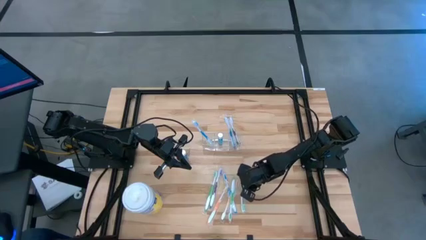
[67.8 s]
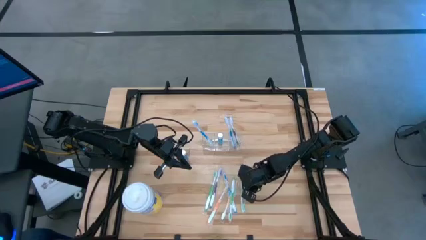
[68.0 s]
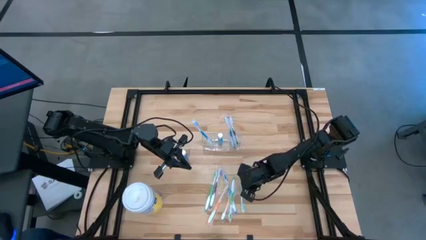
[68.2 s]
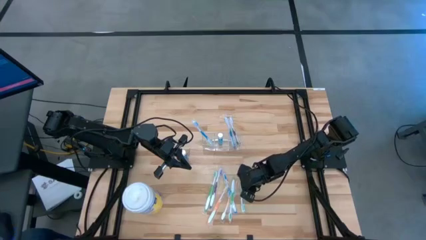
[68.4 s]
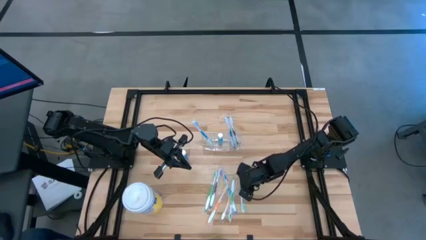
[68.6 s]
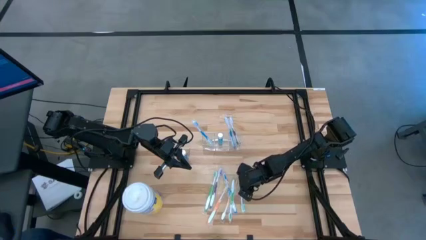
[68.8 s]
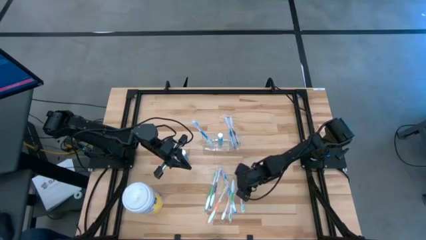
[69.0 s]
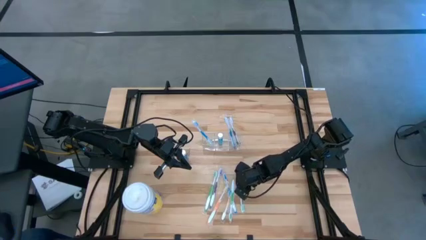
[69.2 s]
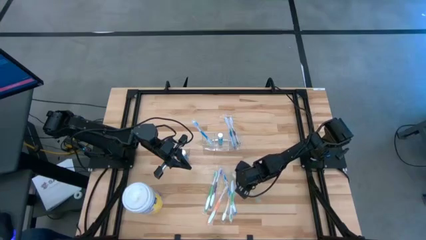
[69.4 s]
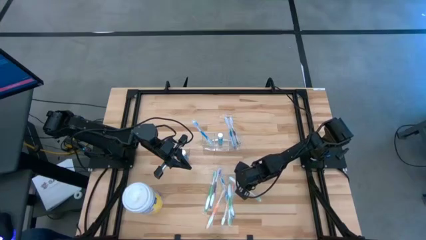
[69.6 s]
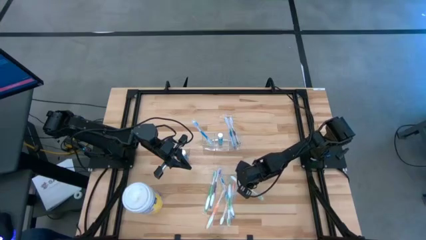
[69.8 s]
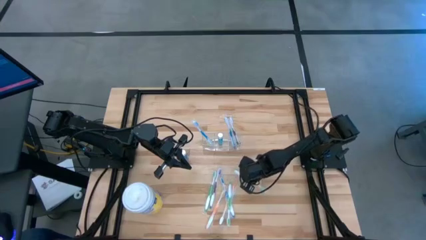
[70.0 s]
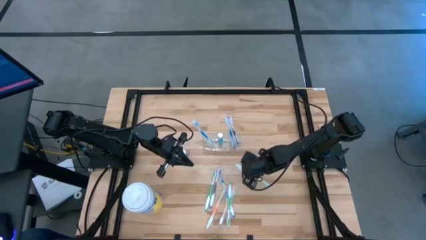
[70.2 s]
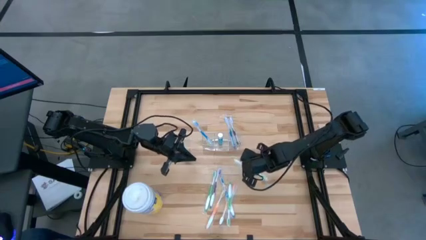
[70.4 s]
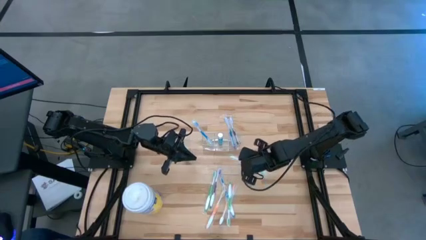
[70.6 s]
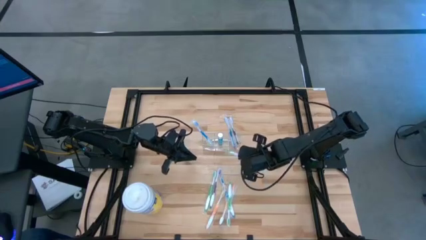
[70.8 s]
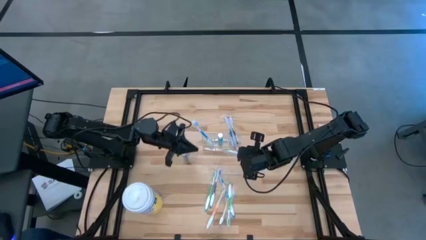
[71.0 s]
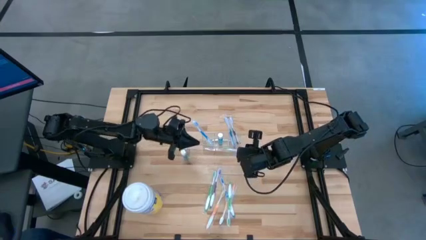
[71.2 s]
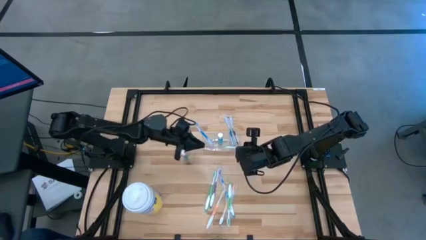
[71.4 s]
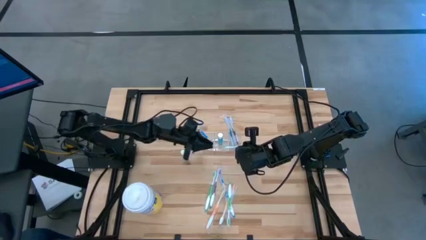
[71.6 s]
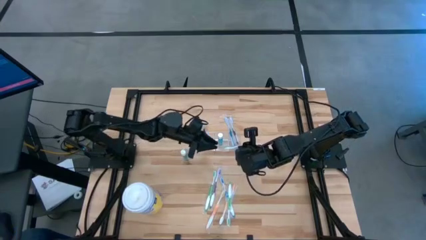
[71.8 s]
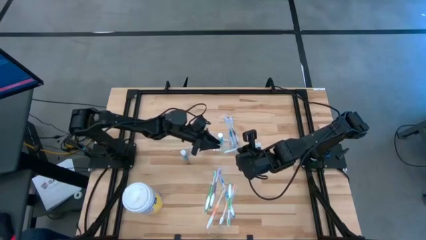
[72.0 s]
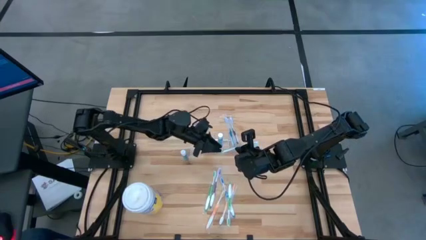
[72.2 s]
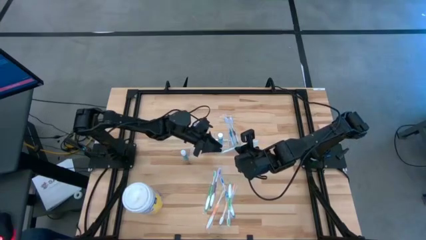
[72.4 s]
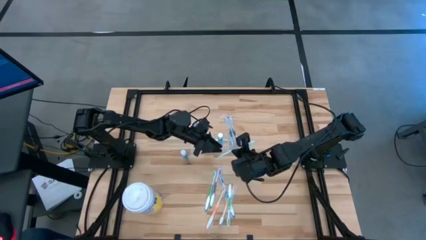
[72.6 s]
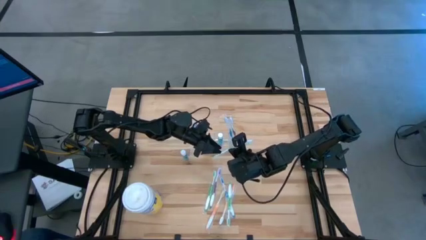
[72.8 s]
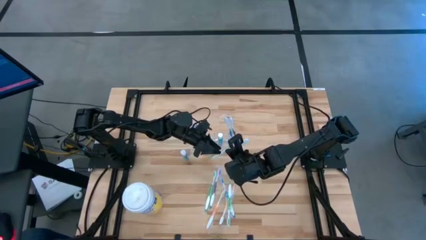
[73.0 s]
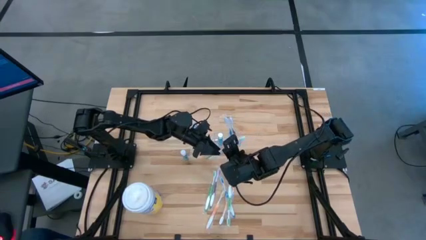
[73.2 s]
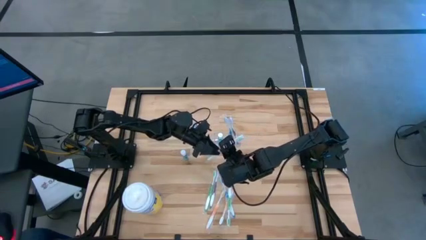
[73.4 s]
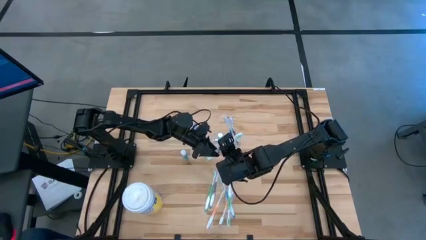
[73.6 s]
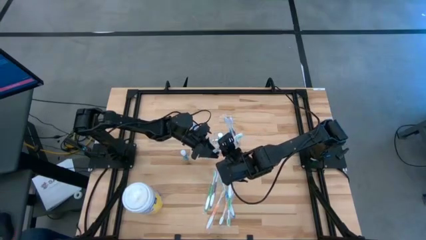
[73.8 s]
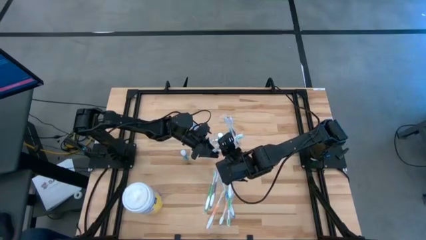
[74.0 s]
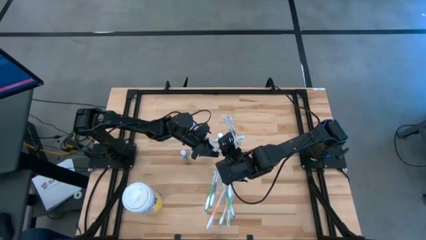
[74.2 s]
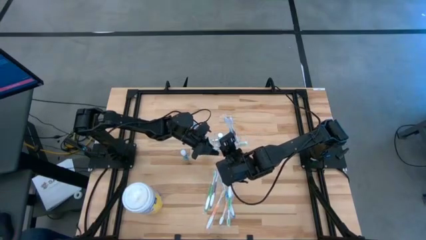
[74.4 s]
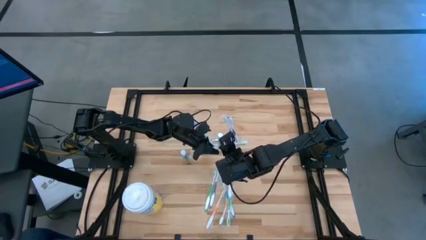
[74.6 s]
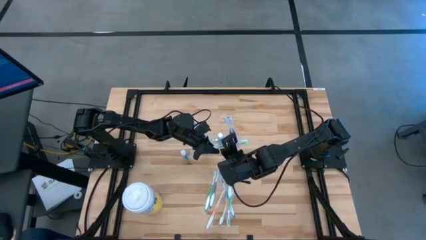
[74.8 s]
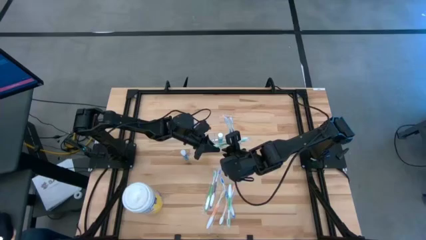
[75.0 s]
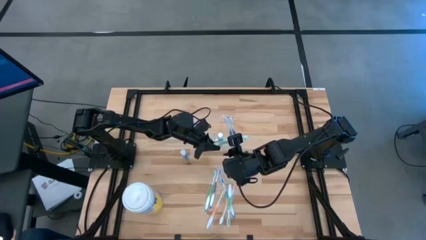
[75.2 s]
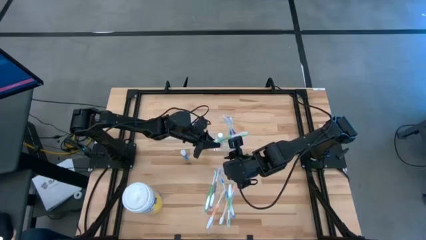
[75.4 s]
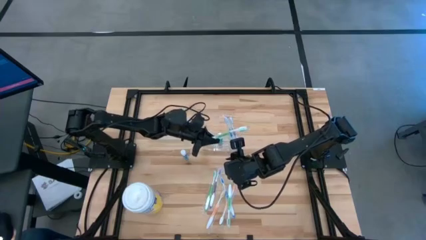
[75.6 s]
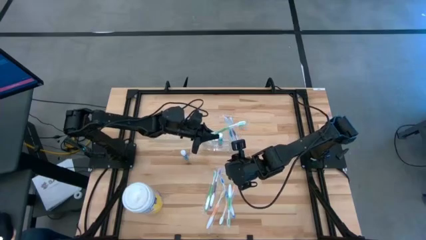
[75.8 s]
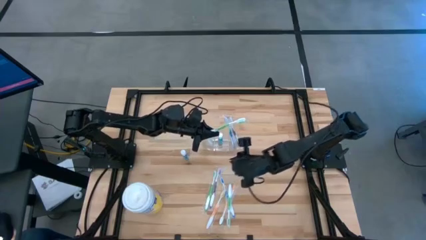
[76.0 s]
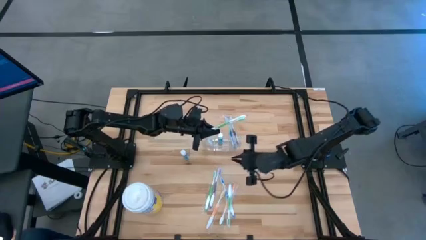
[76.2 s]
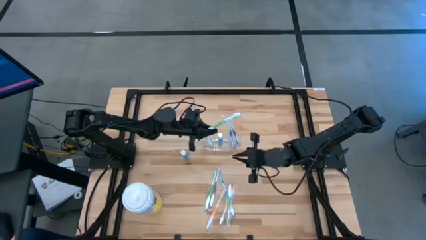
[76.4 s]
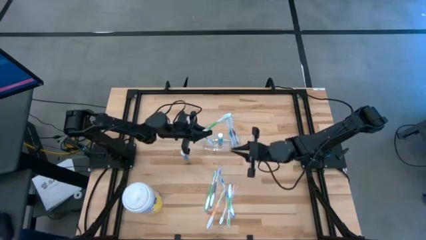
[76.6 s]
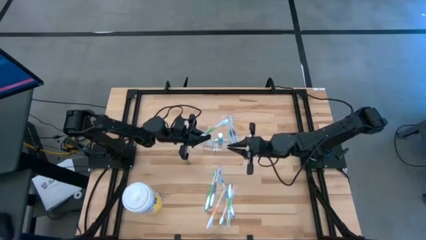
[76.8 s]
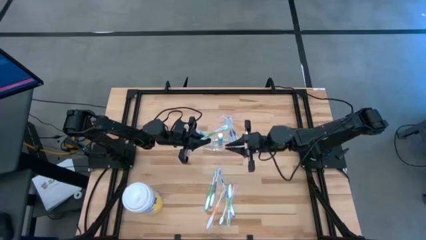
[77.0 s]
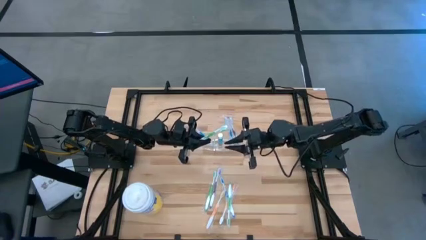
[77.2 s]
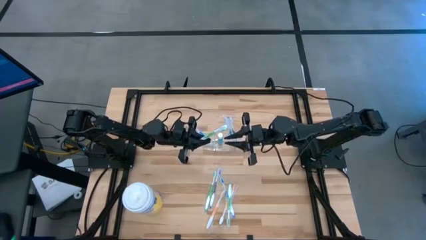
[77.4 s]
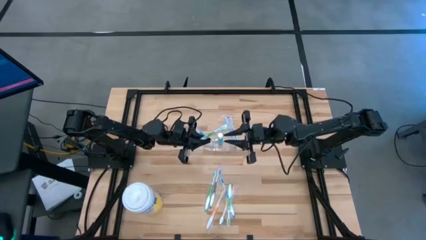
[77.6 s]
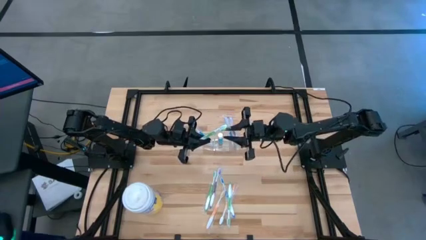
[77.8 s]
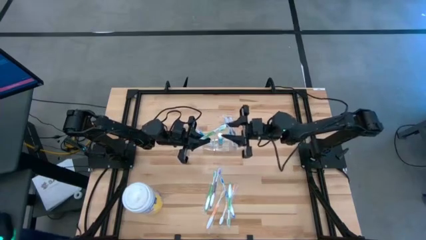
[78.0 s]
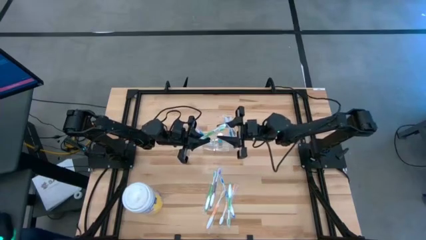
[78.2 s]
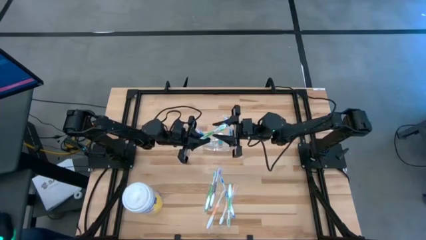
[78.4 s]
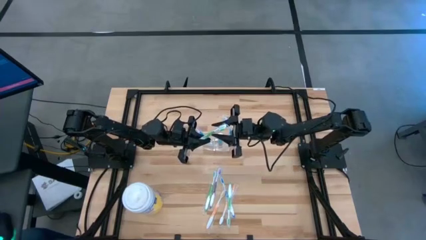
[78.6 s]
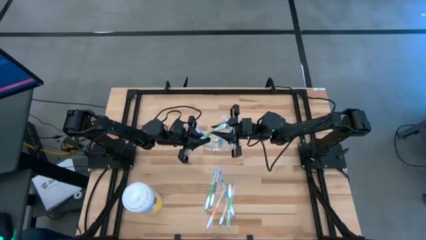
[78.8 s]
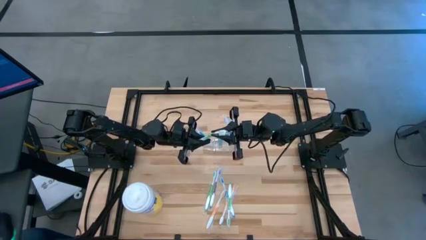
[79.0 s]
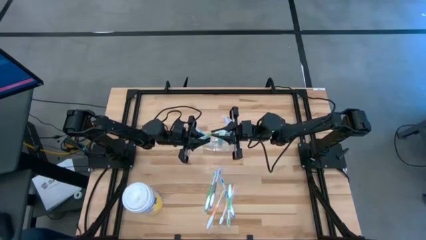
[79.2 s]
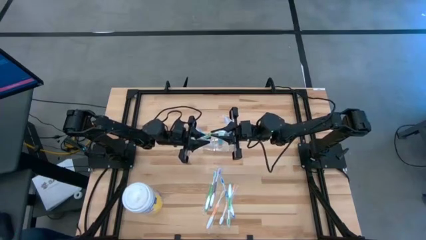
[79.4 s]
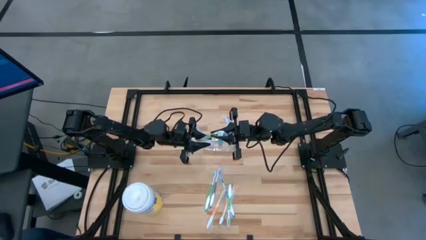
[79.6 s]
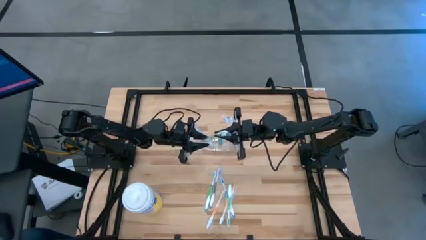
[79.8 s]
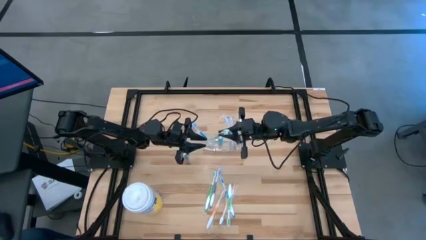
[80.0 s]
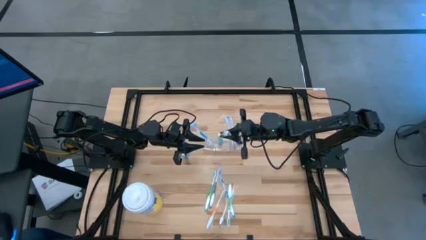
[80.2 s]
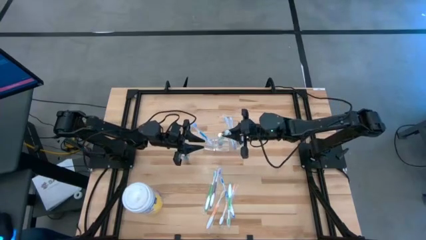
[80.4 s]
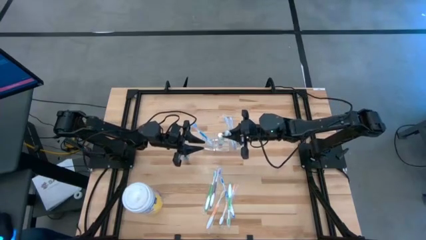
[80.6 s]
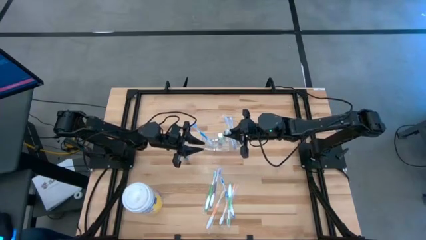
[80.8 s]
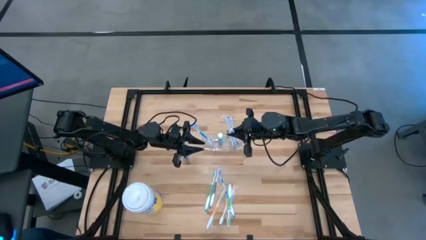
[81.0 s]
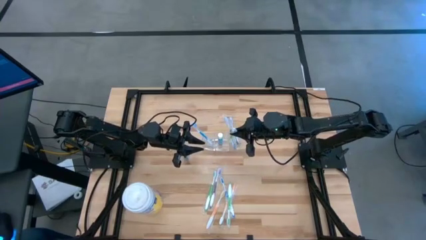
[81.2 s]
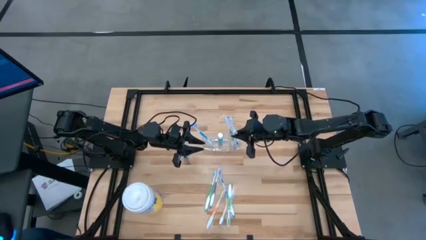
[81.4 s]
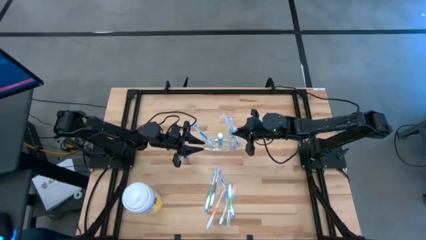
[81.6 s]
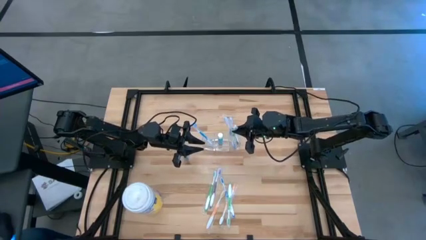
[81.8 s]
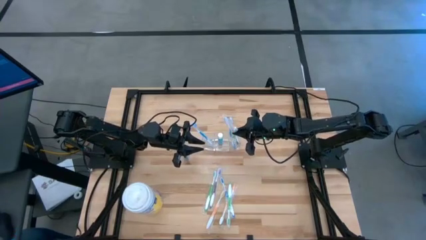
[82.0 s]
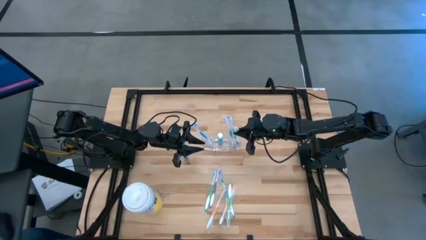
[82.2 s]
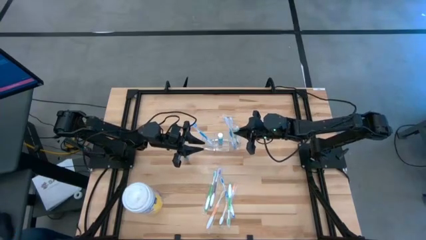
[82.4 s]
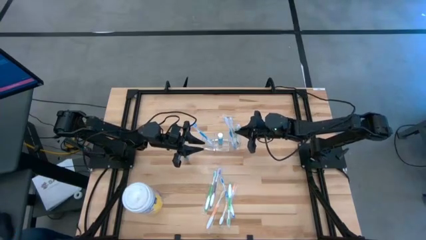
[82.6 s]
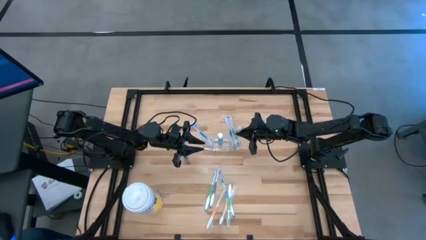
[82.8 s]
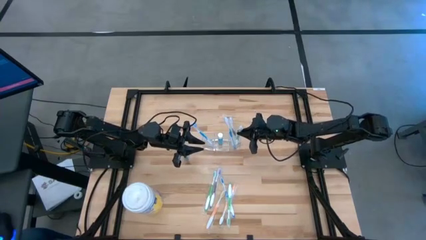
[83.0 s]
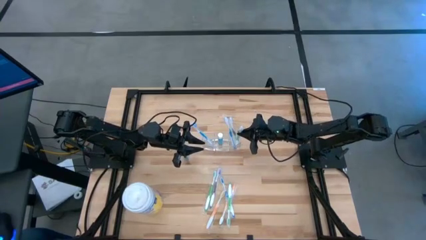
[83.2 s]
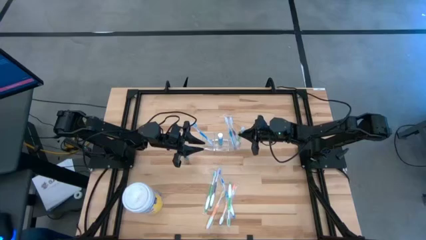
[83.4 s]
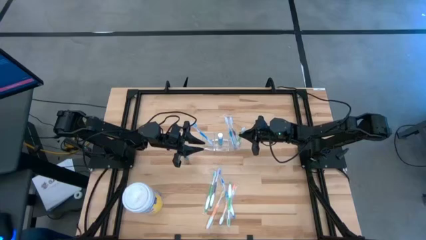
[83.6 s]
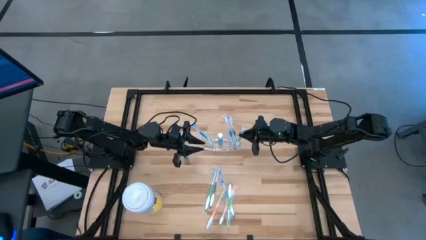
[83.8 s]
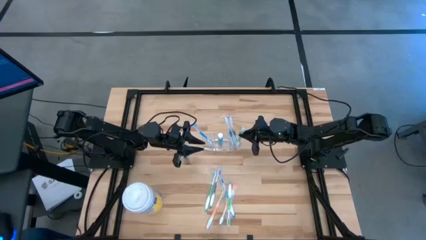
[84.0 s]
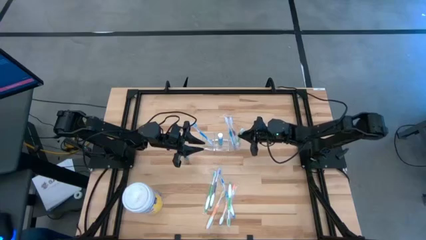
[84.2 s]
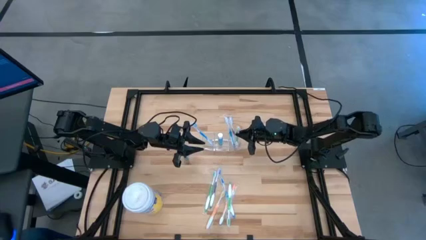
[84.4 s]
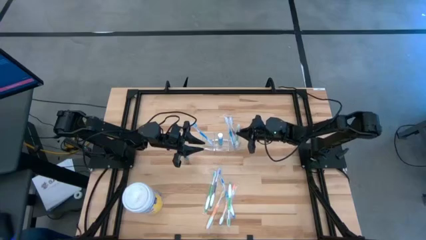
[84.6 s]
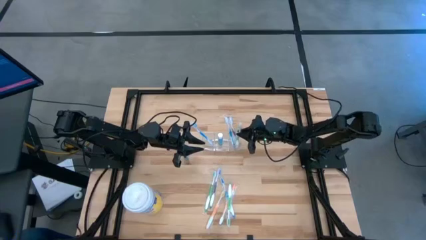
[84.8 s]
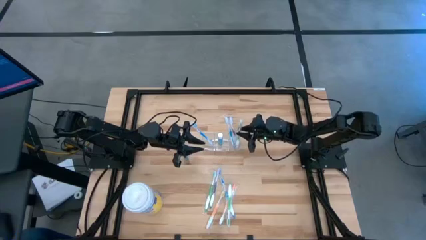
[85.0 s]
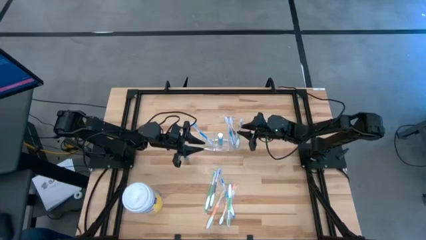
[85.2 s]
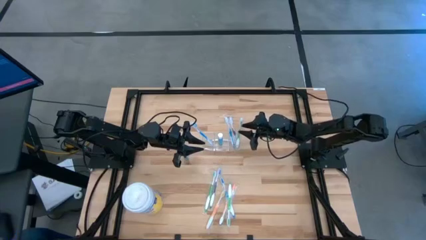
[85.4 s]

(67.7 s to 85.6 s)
Task: Pick & Place toothbrushing station
Put the green toothbrush into the transparent organizer
